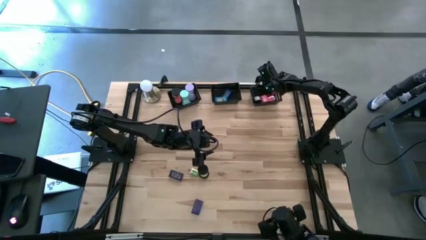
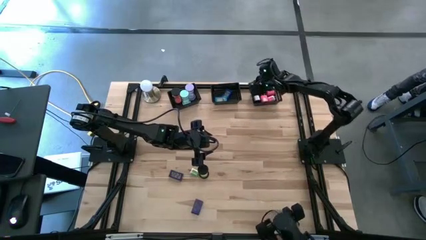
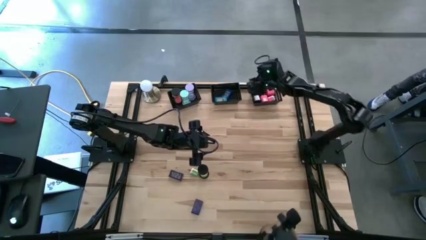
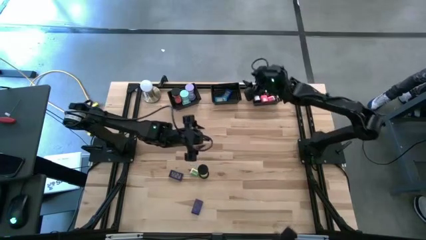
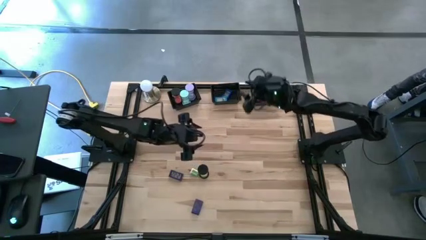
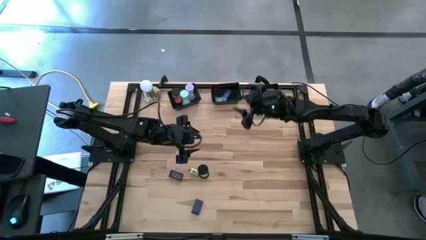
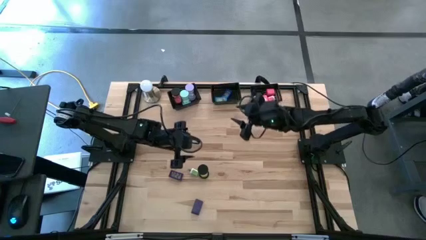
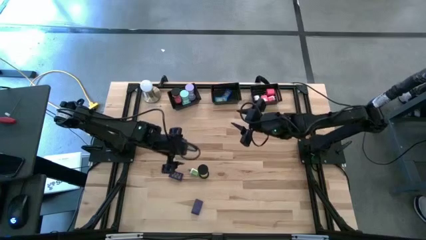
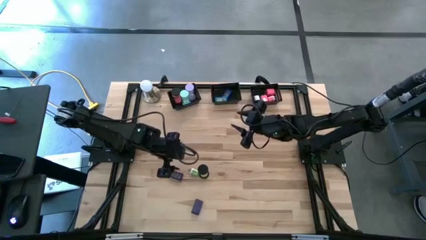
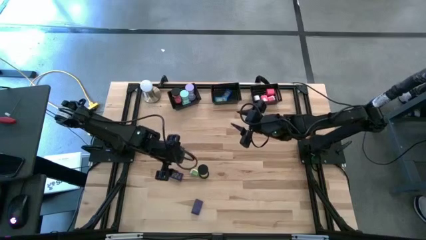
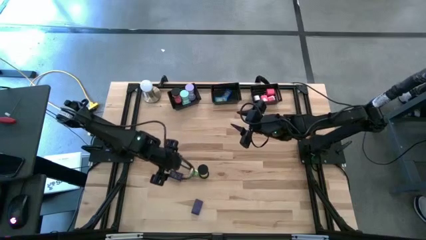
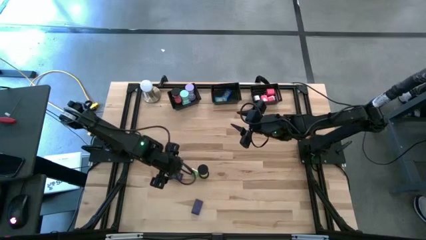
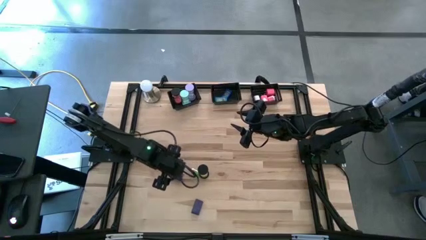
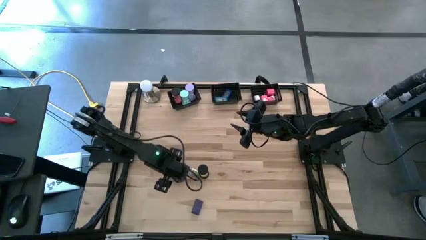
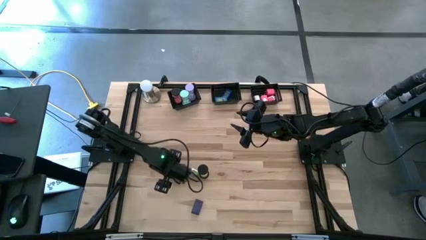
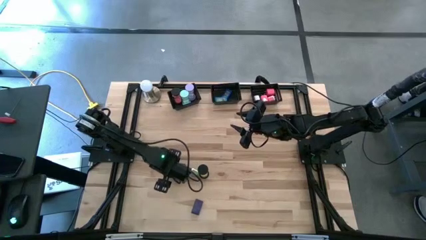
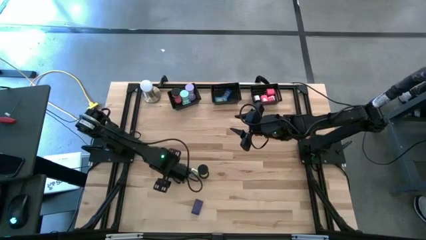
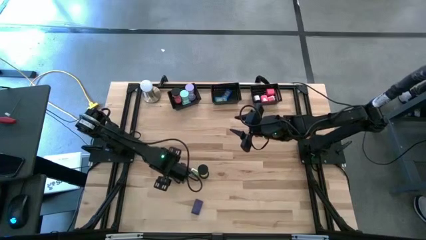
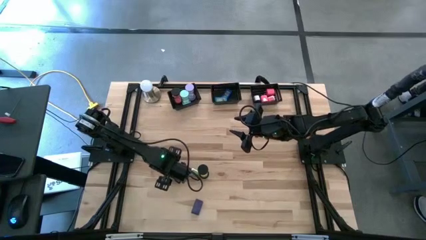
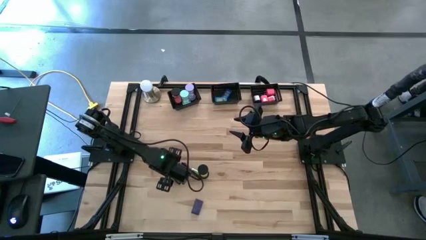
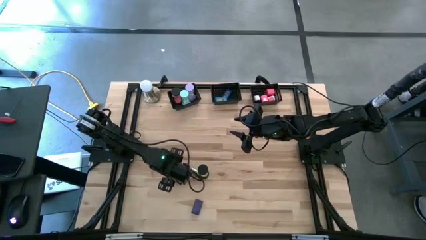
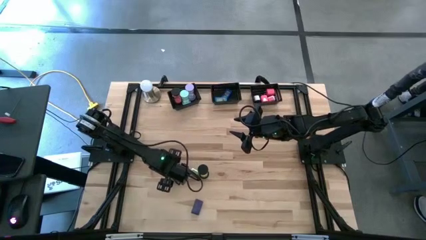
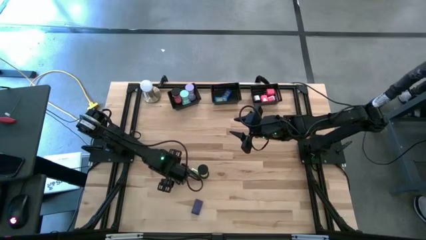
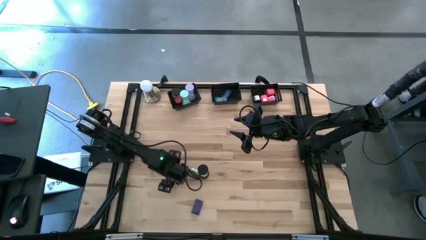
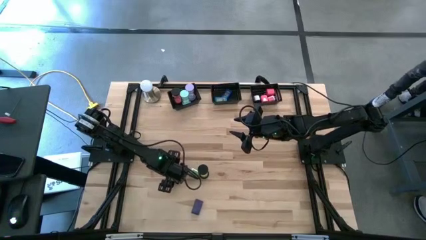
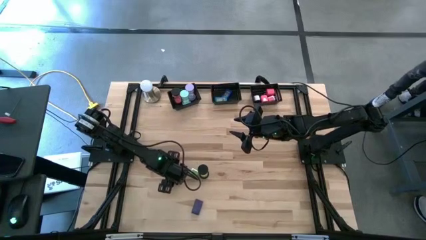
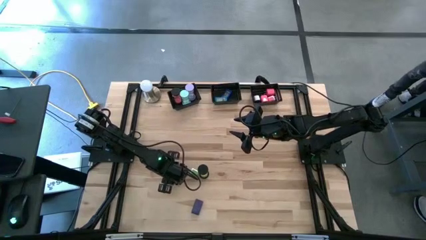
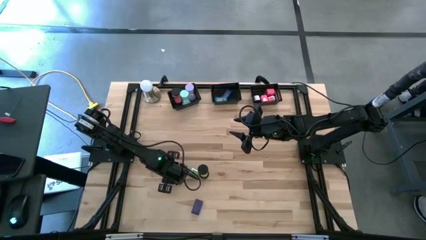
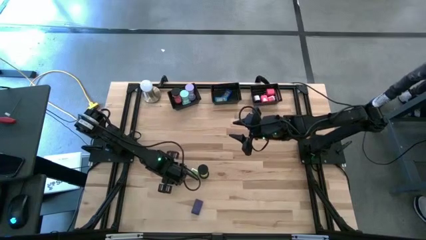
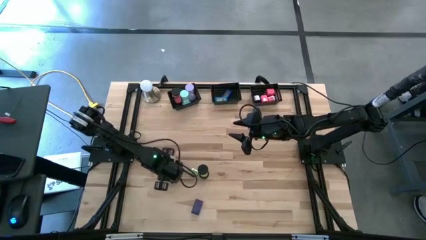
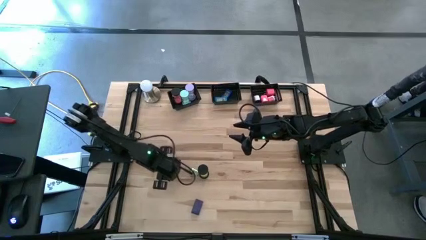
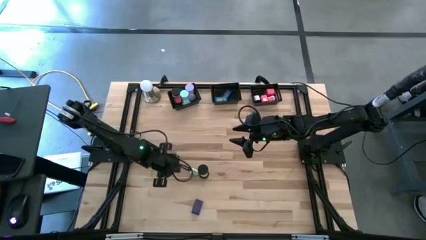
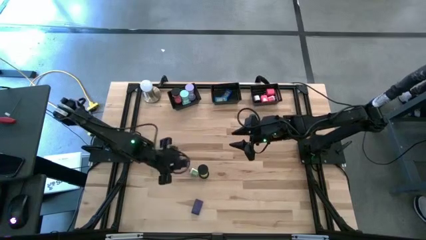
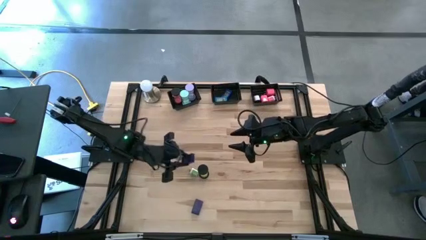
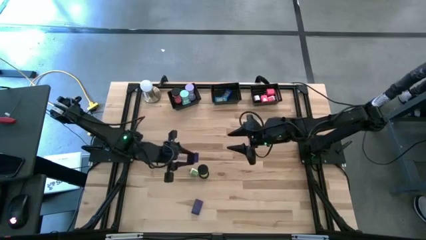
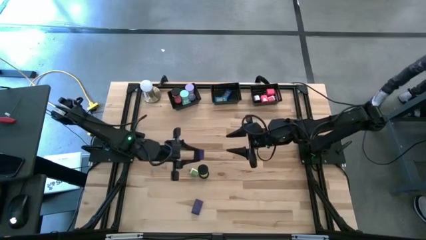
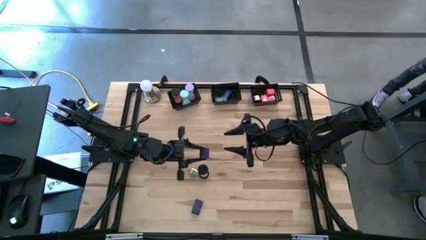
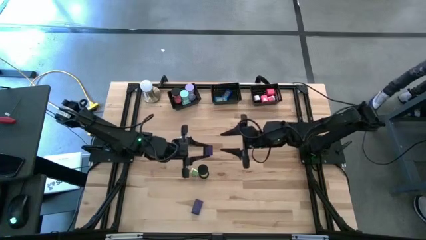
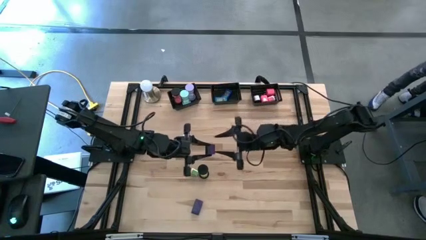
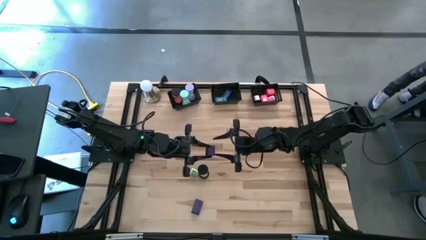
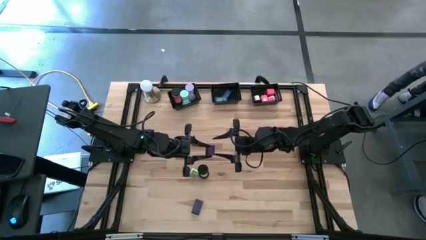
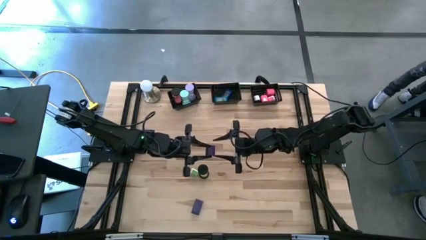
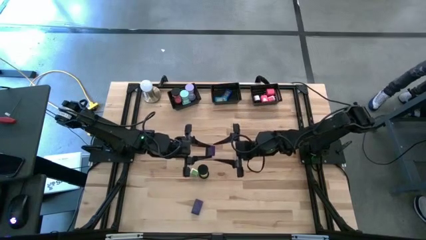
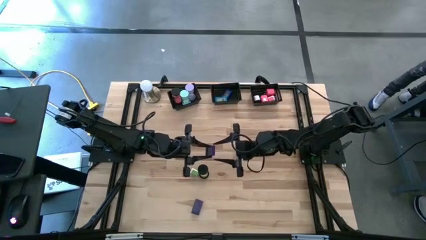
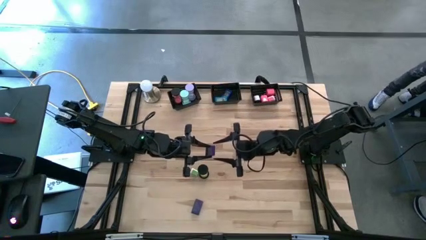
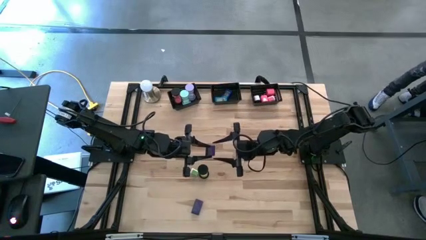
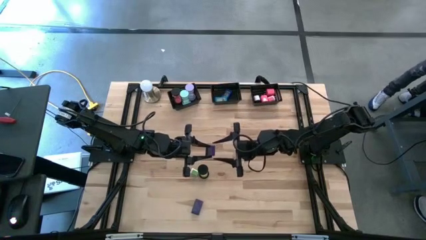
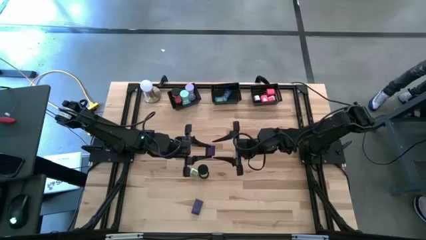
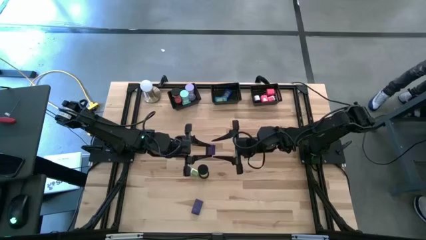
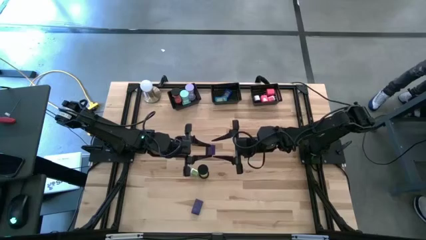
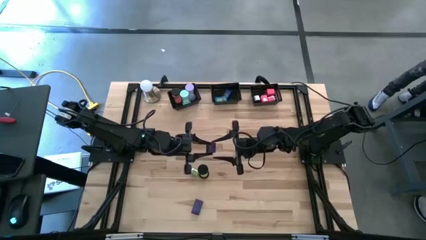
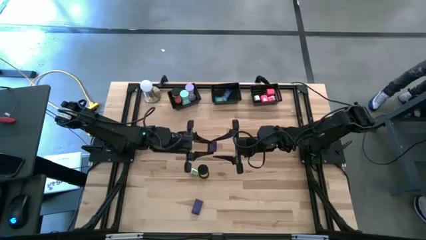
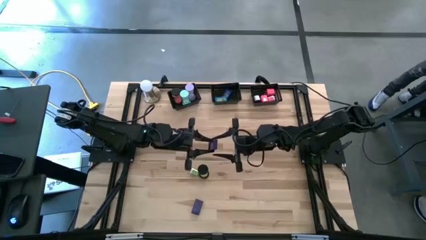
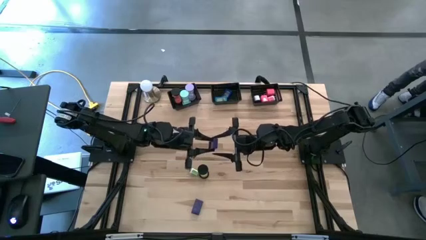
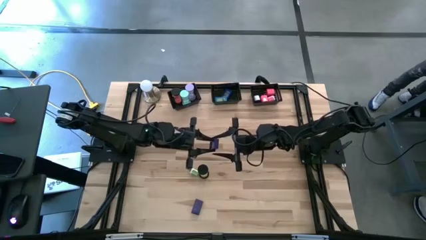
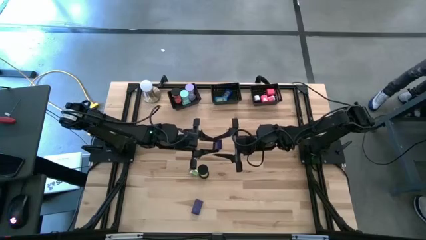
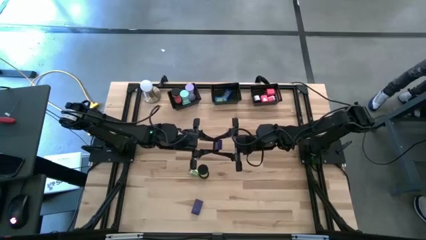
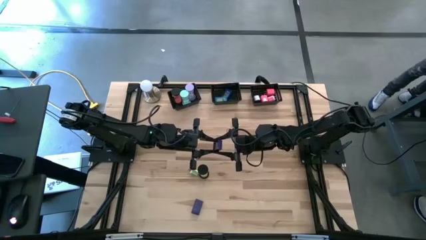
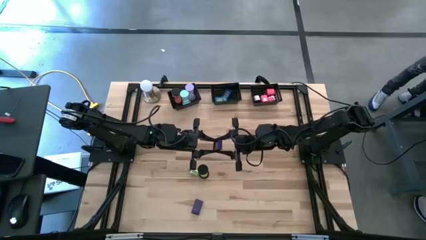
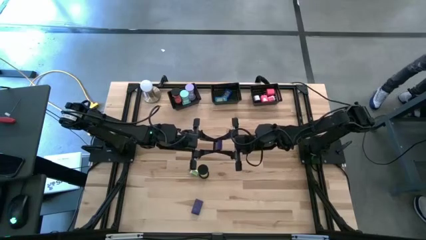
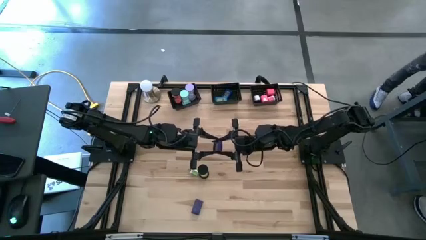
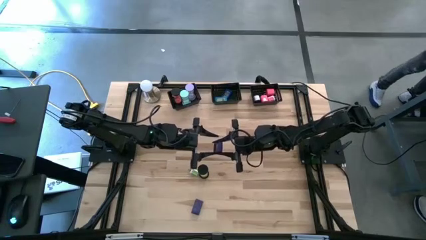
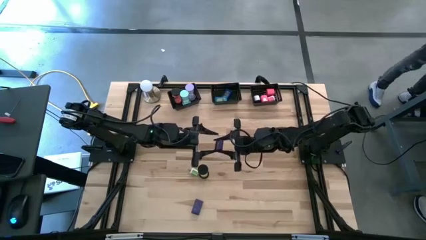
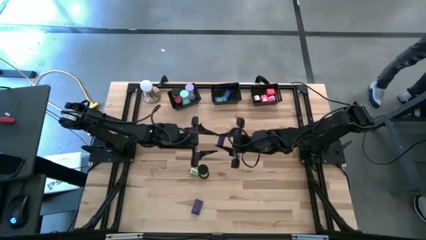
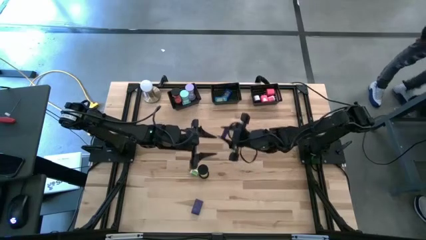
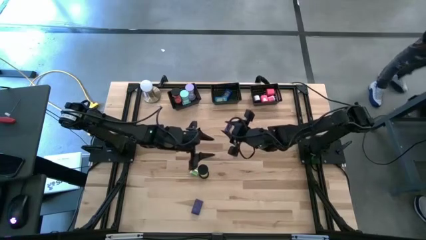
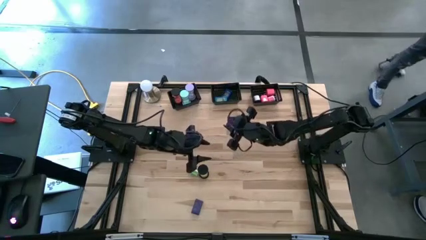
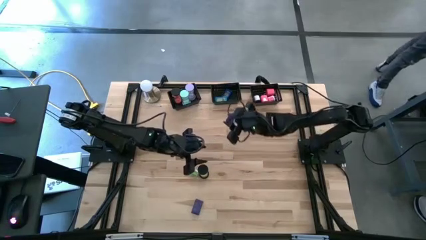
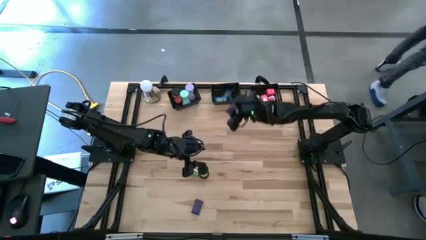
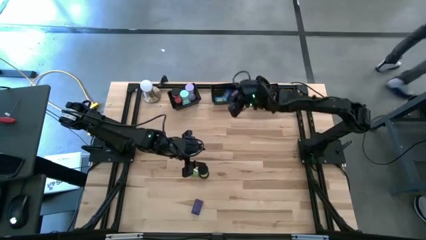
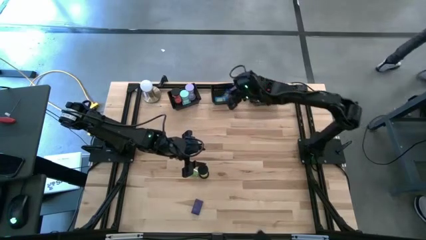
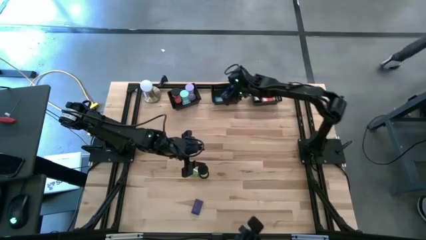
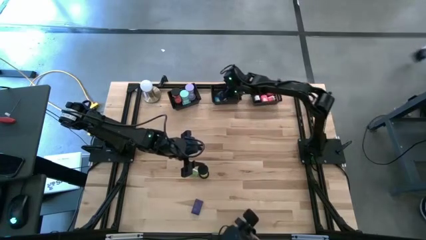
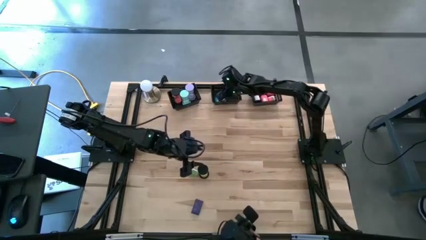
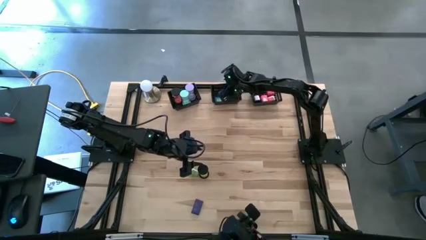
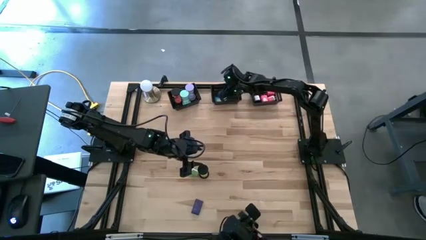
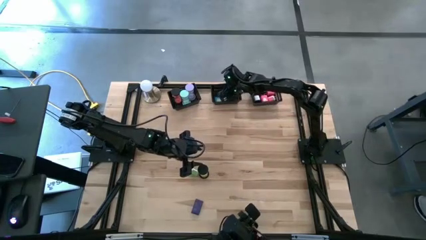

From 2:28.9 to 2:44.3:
Task: Pick & Place Office items
Put the top purple digital clock into the middle black bin
